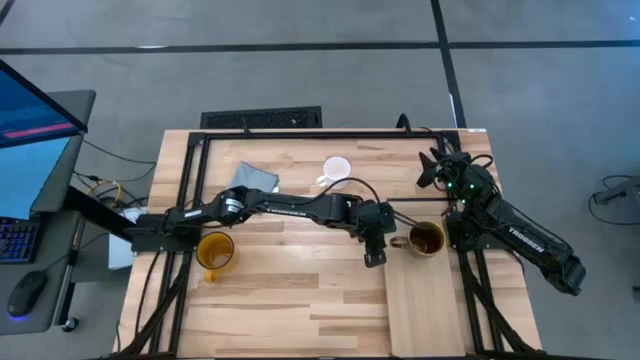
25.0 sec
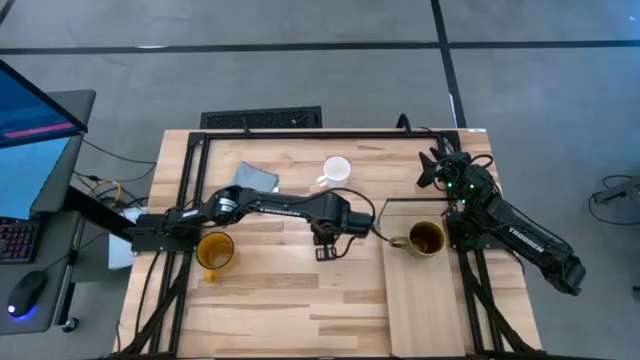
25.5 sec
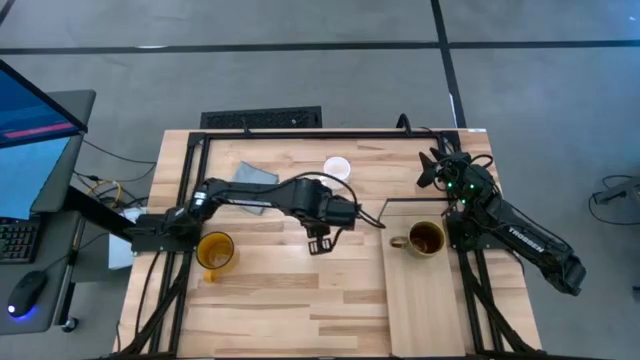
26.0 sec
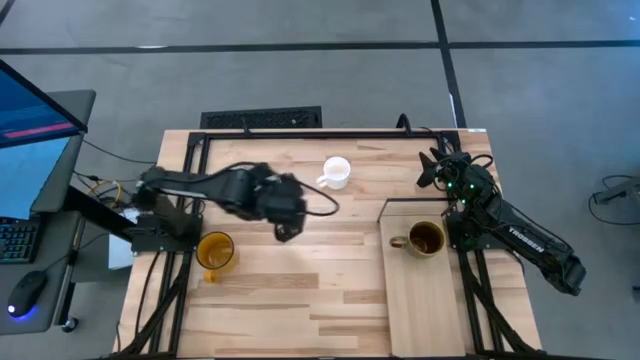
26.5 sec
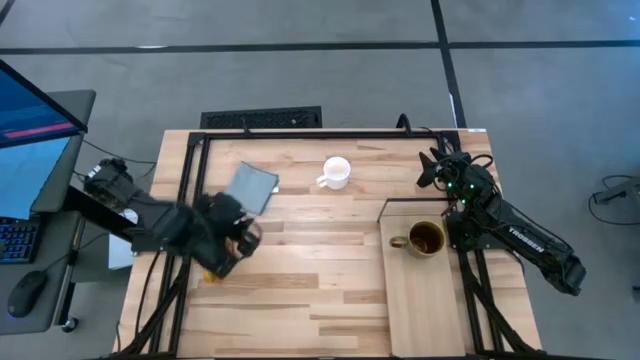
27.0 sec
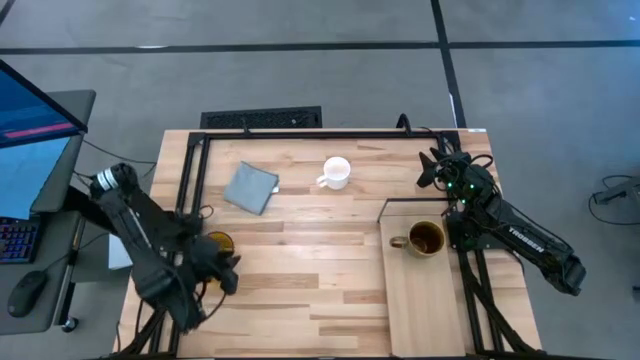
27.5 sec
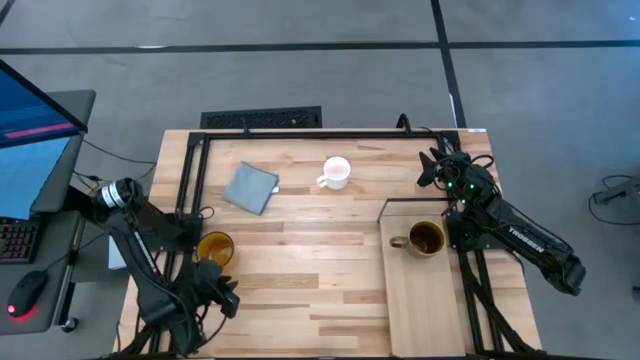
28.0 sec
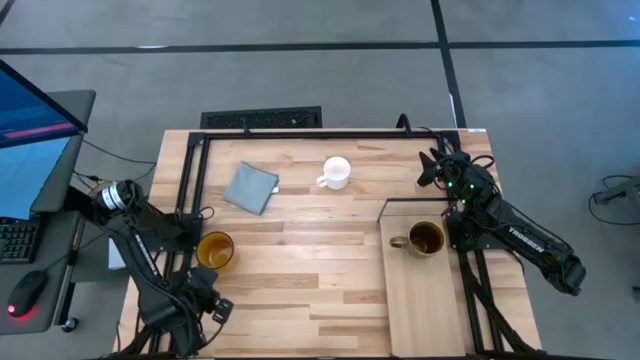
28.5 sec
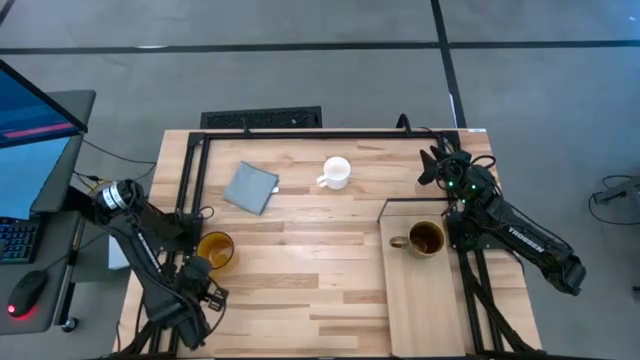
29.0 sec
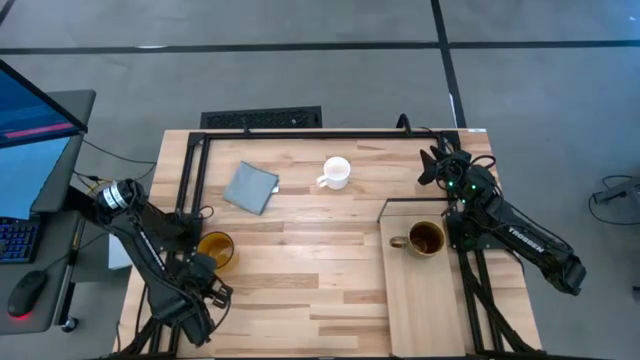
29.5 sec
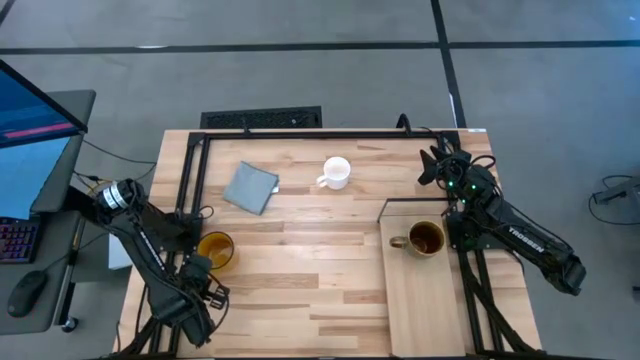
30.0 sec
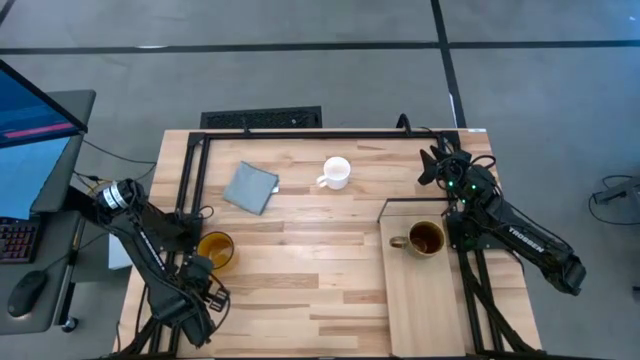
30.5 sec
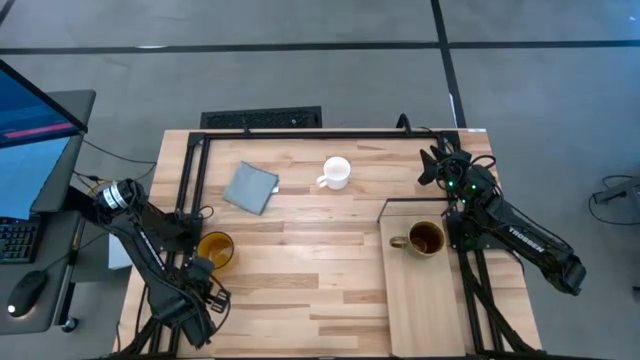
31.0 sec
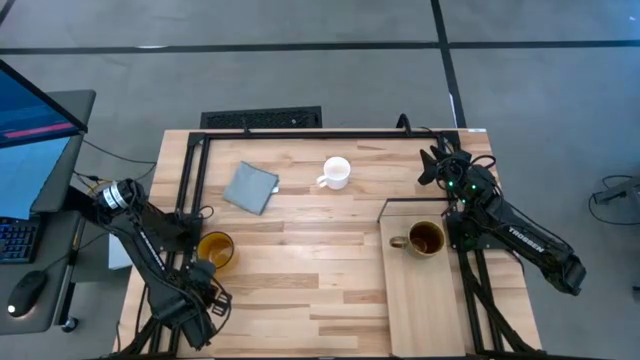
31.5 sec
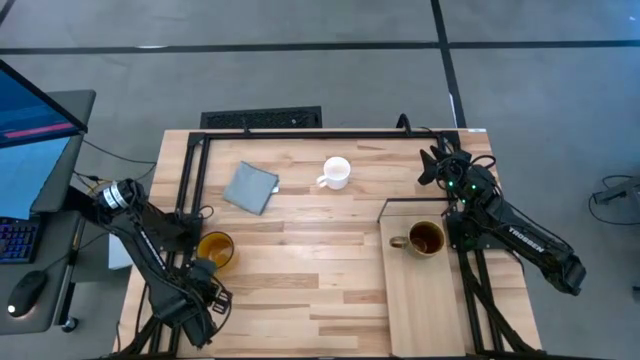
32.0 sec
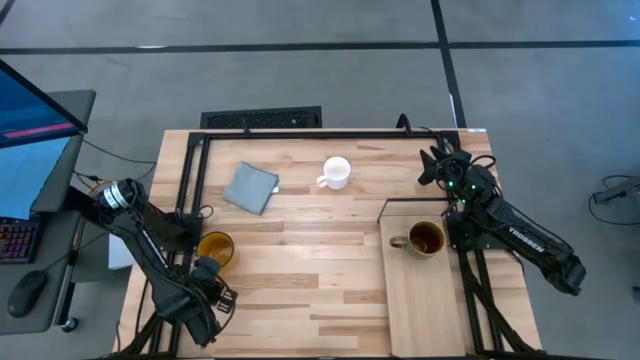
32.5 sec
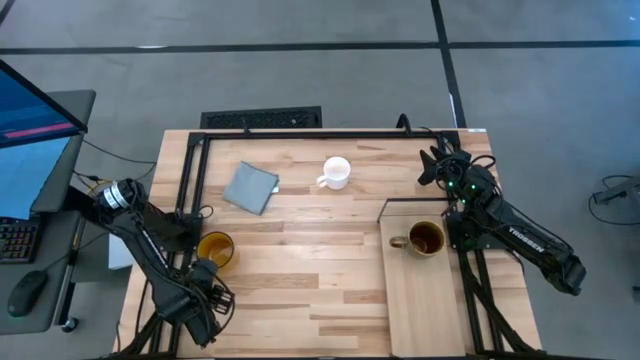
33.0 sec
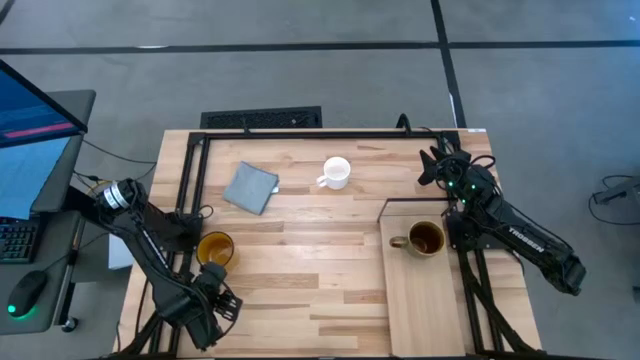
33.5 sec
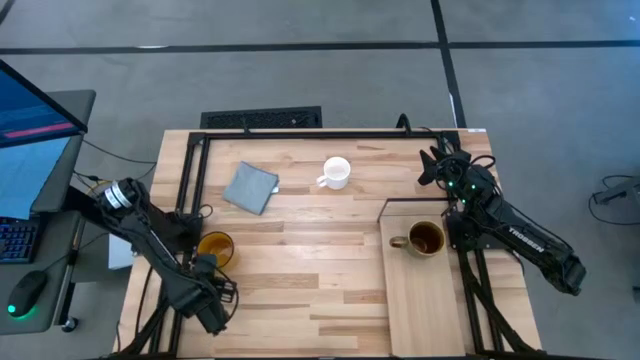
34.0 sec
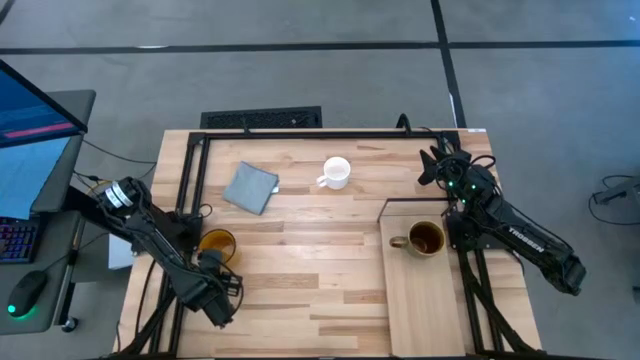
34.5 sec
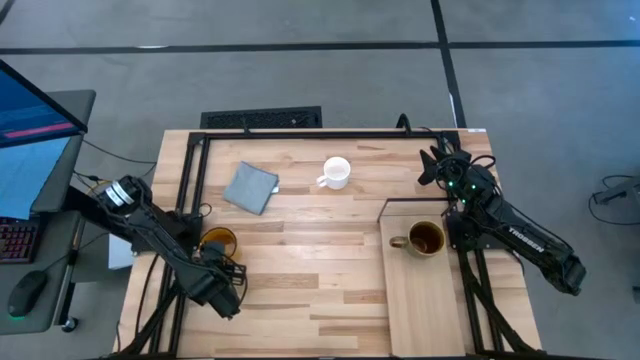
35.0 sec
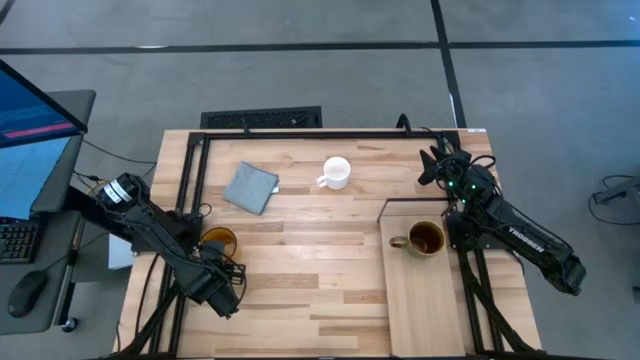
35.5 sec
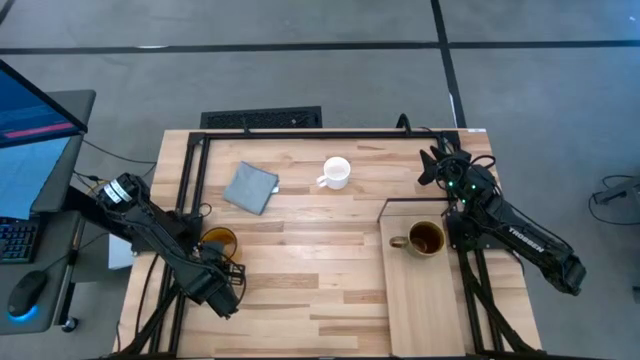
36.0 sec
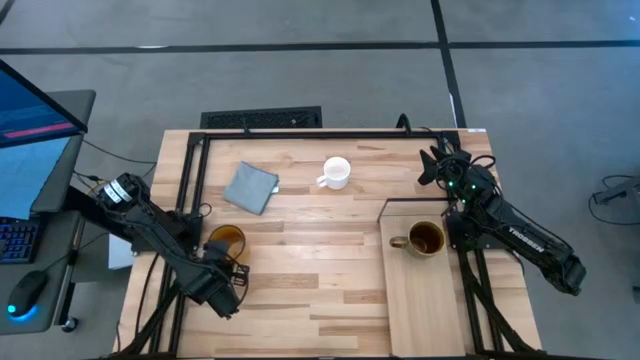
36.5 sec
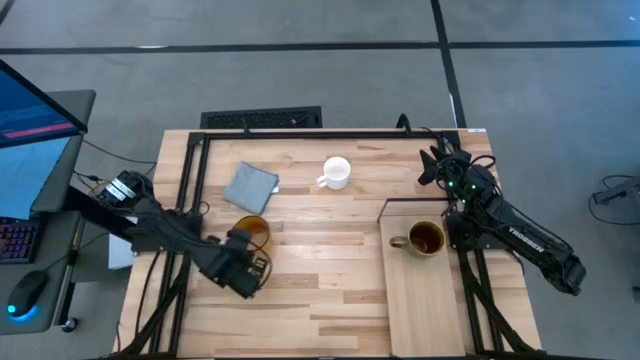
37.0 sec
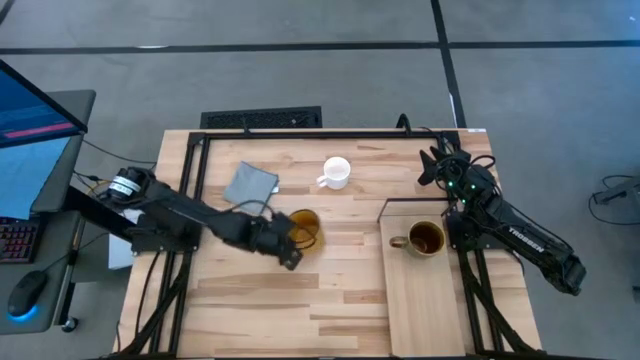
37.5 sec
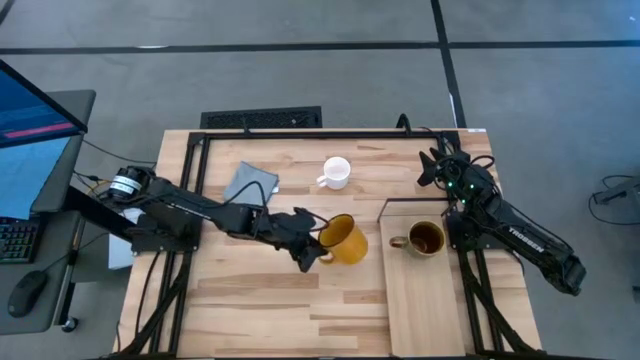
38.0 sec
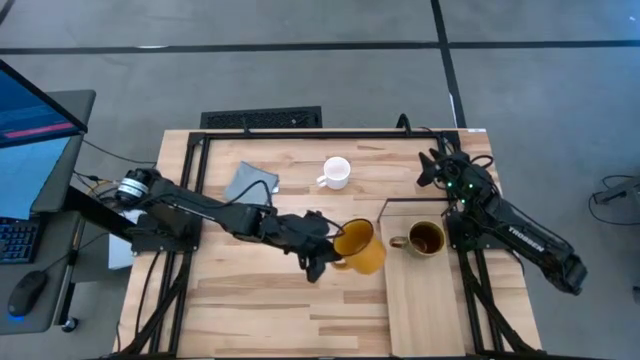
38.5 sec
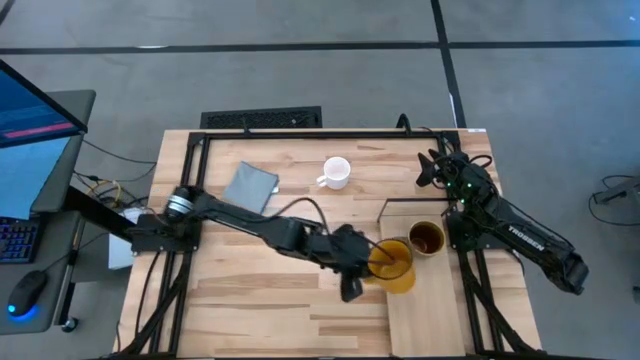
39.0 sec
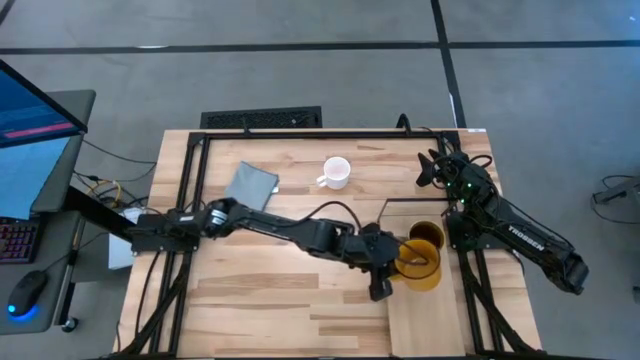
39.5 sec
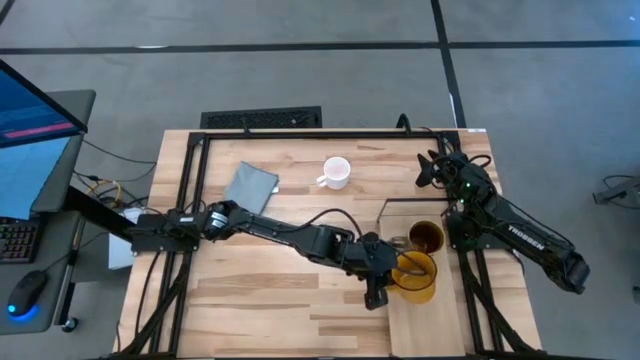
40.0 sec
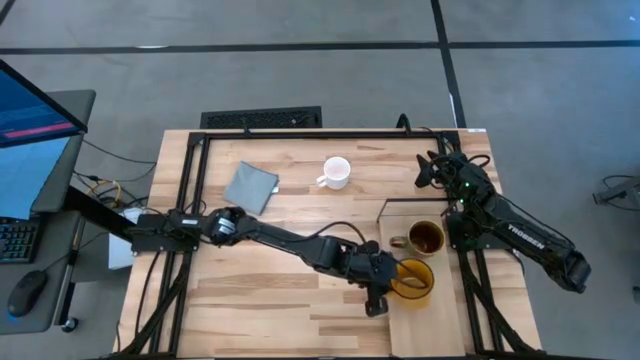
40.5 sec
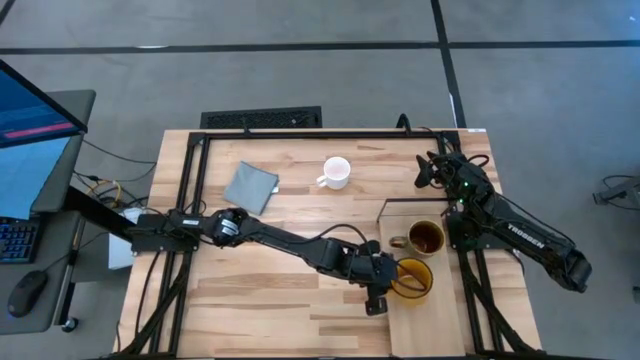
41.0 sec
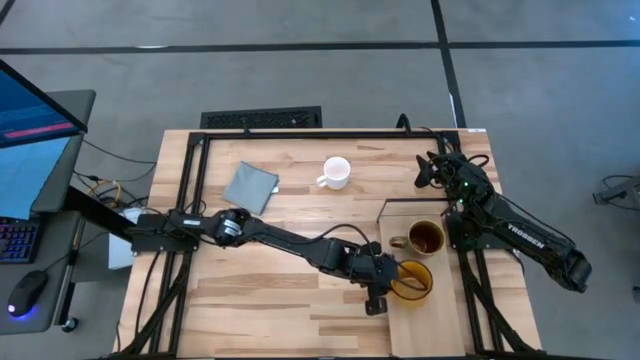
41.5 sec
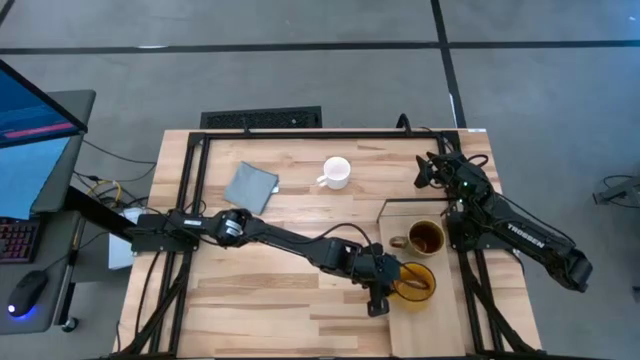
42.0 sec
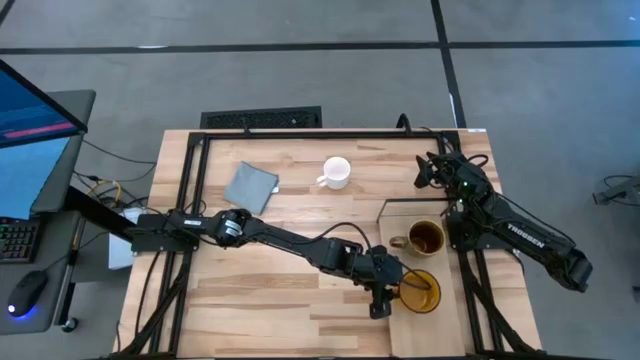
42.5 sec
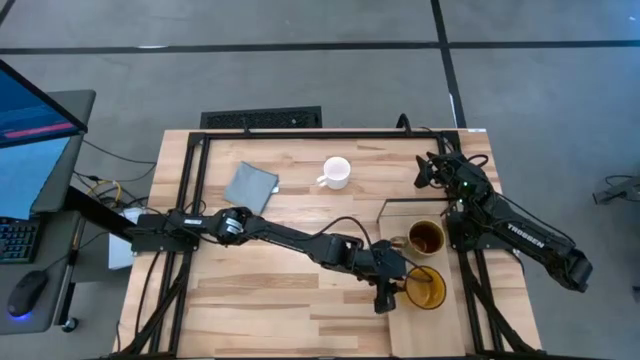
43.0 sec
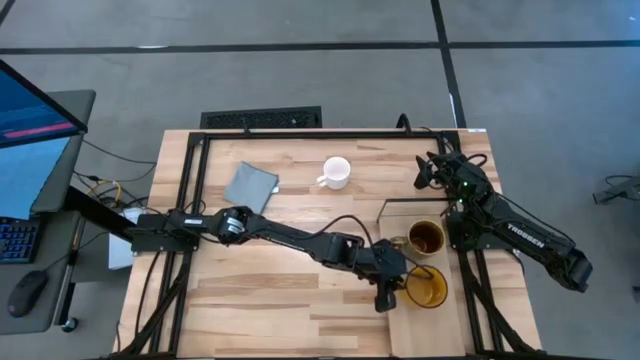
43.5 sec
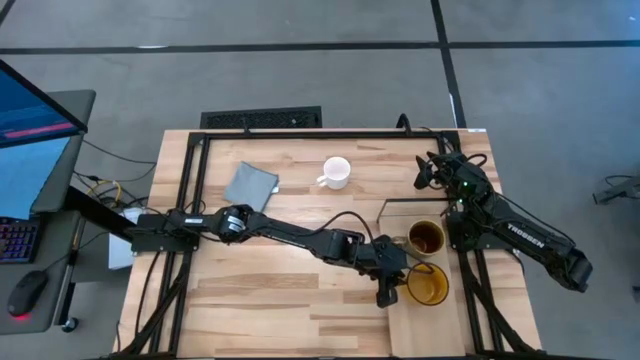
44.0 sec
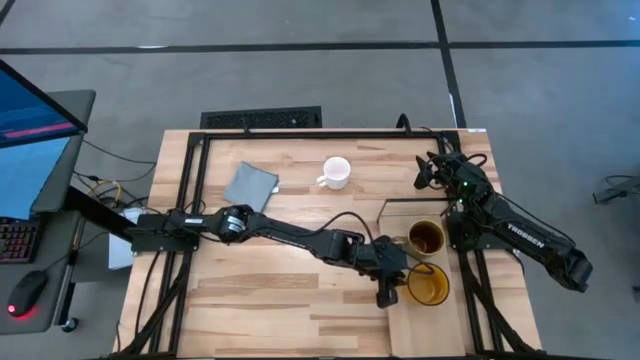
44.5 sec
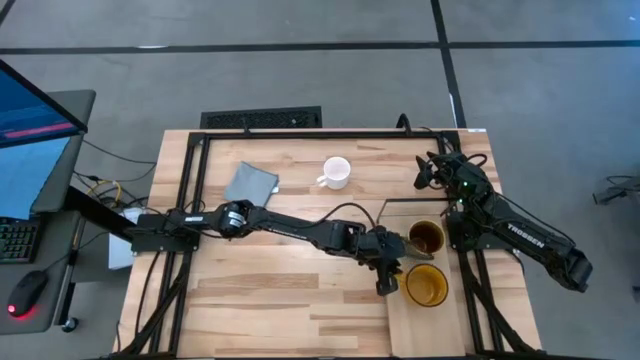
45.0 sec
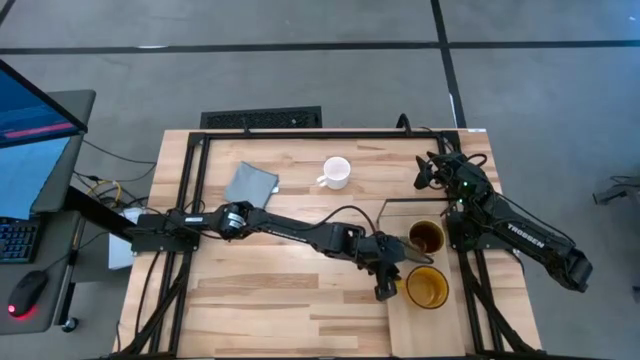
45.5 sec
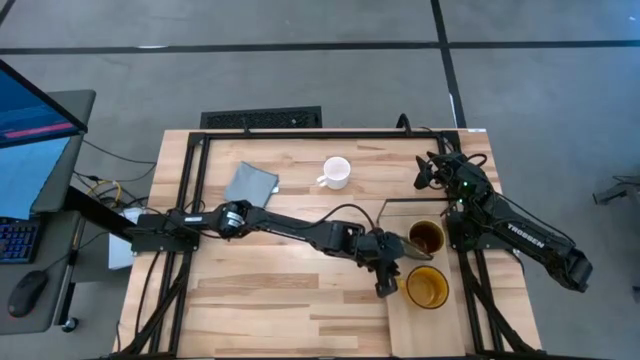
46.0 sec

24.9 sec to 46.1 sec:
Task: Stack small to large cups/mugs on shelf
Put the yellow mug on the shelf
